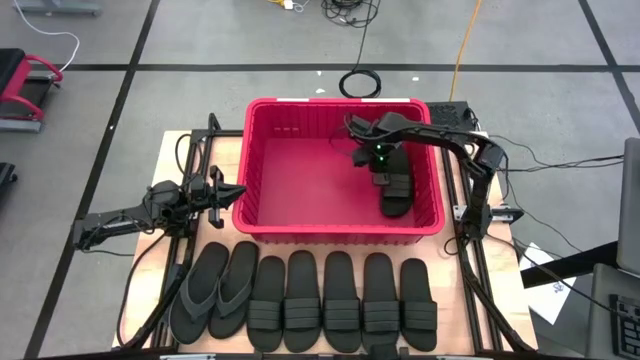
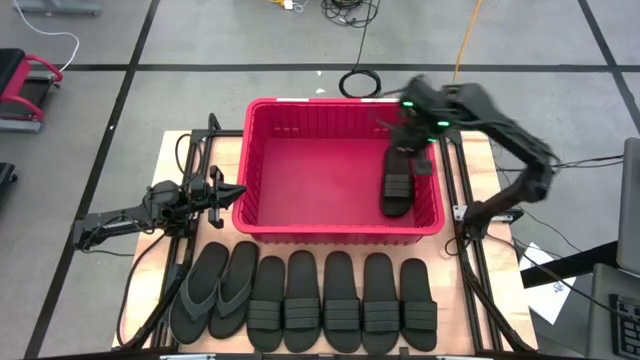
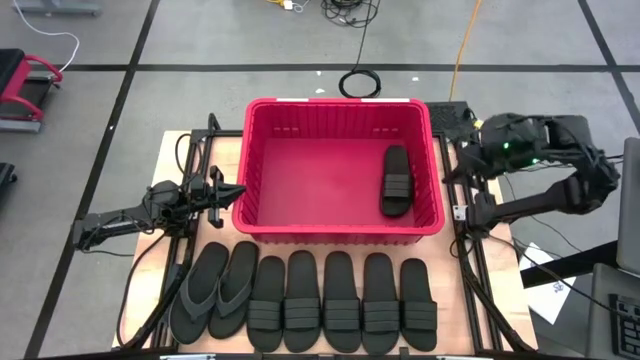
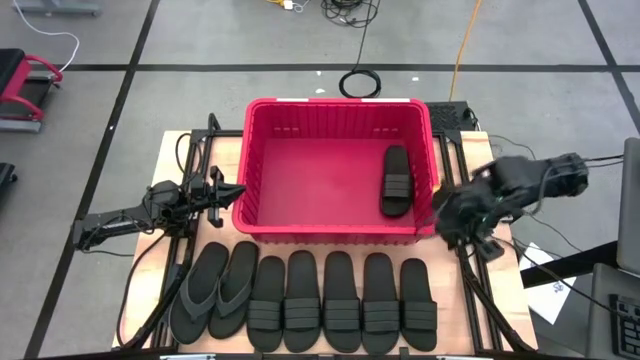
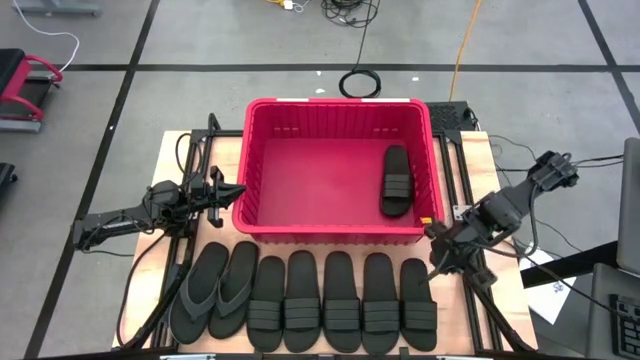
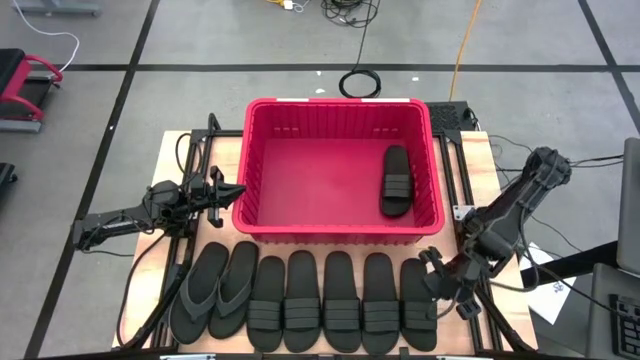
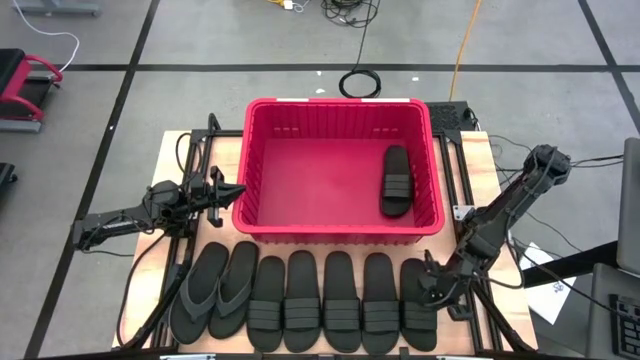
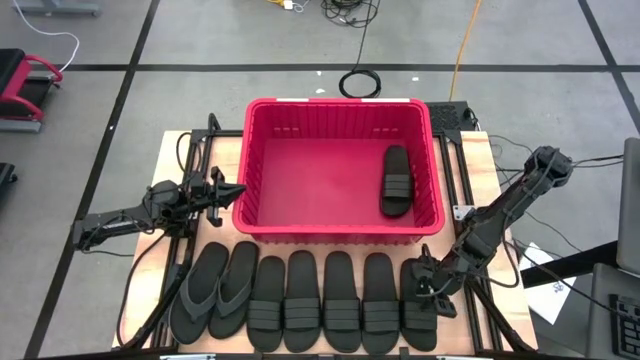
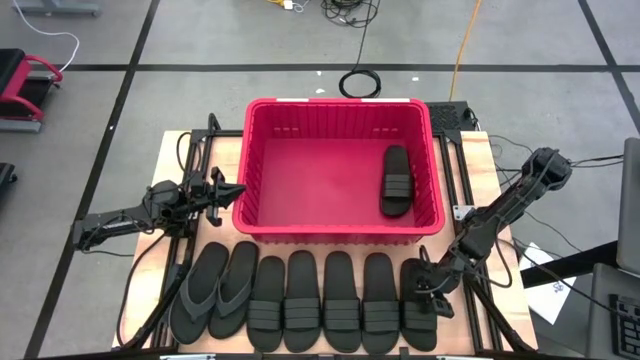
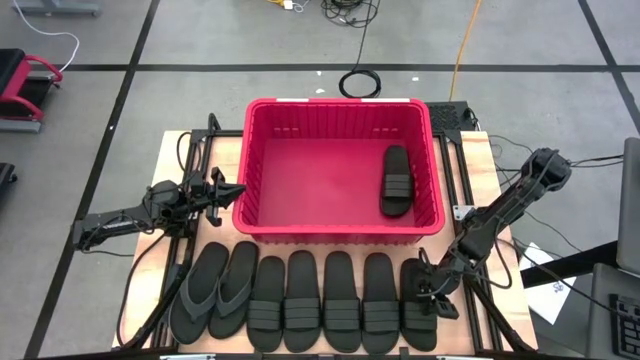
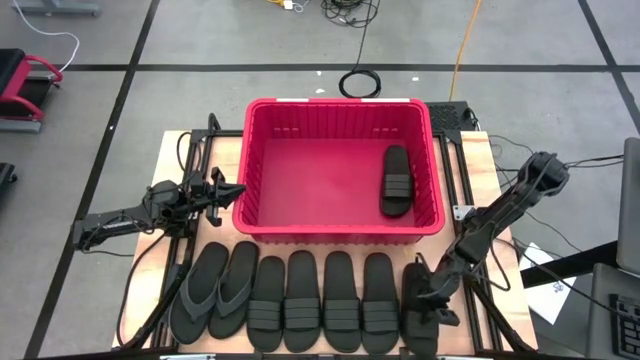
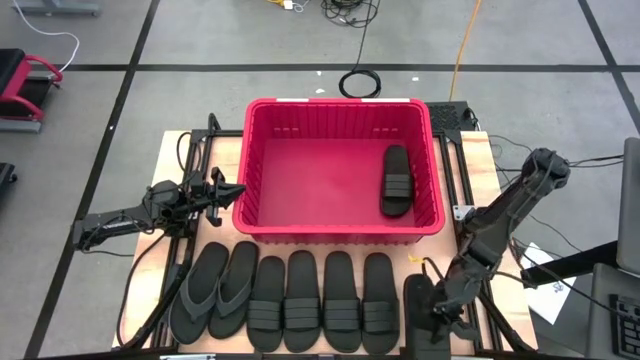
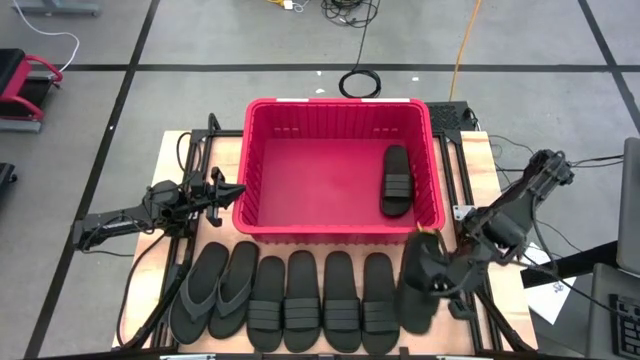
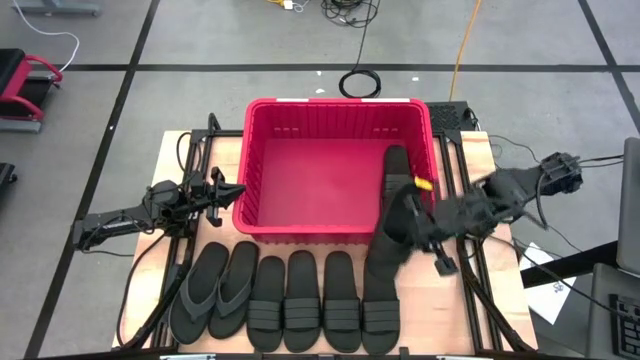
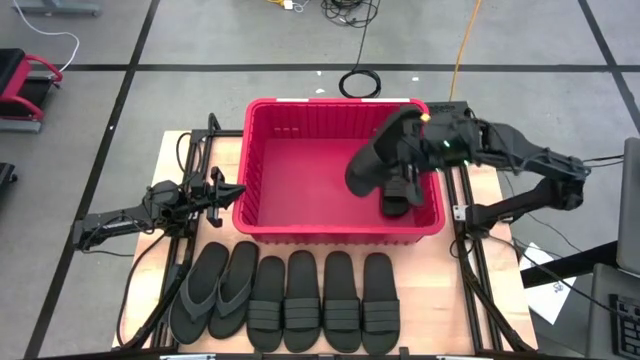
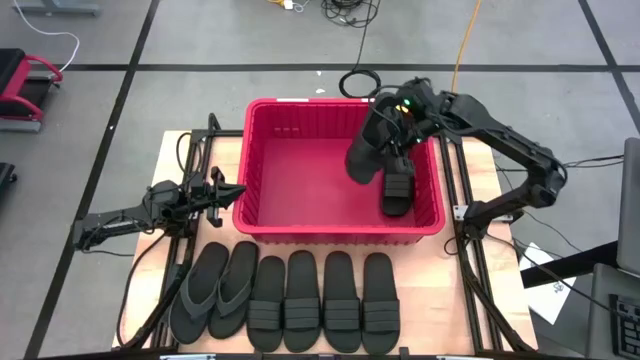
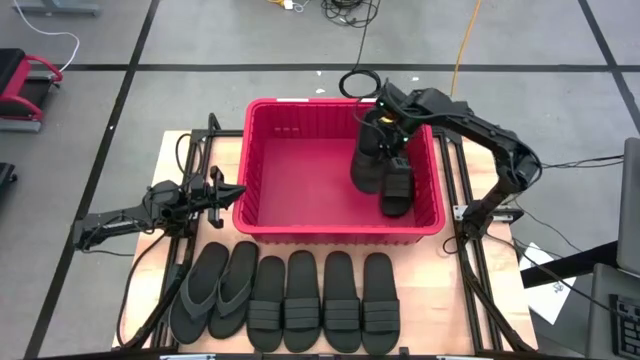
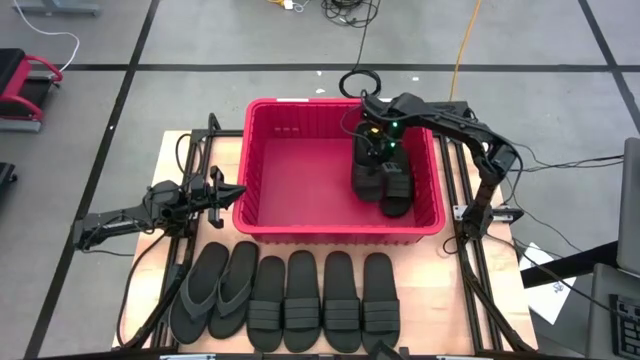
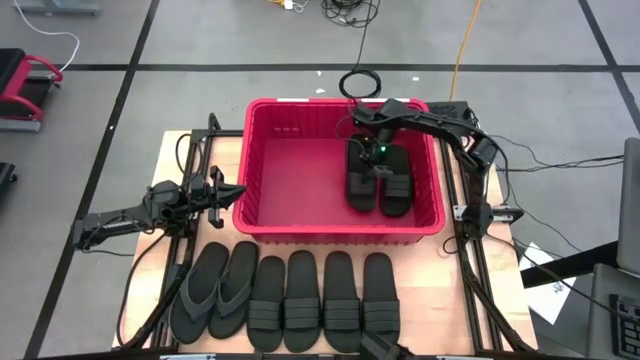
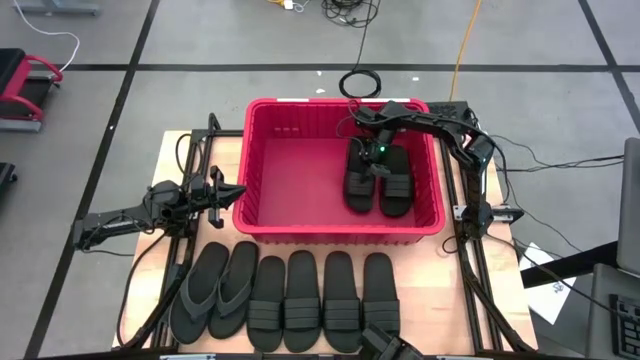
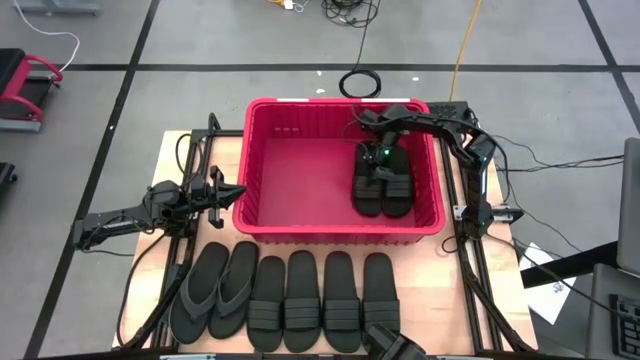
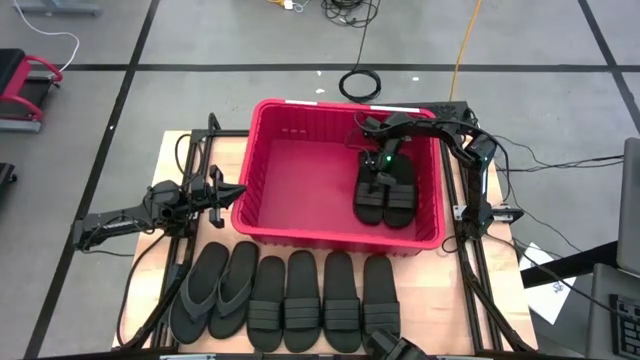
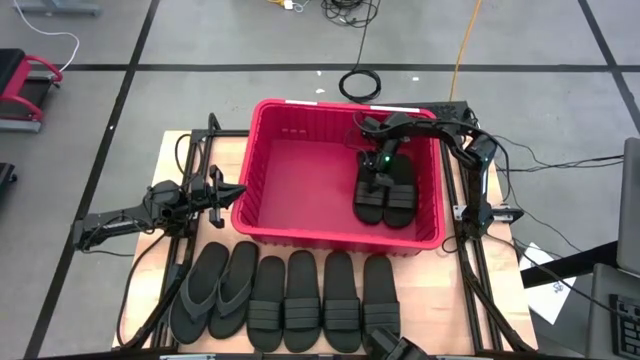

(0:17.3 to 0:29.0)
Task: Pick and place slides into bin
Put the black slide into the red bin

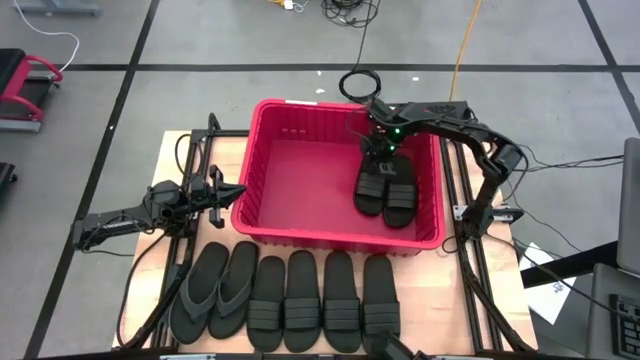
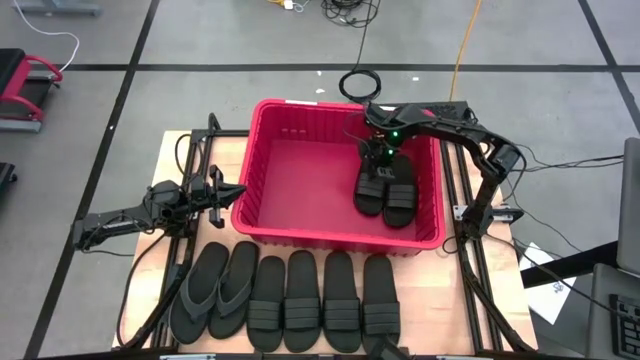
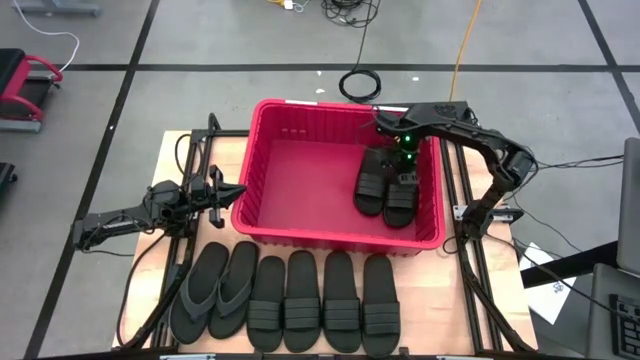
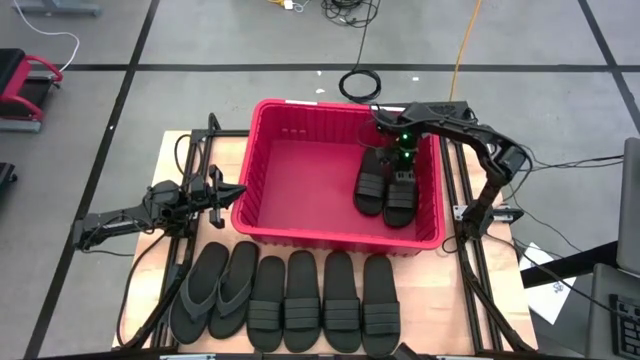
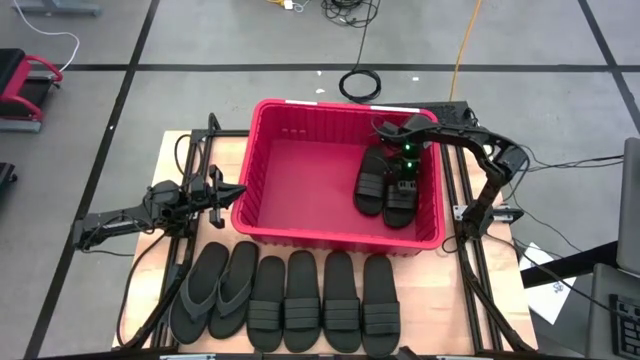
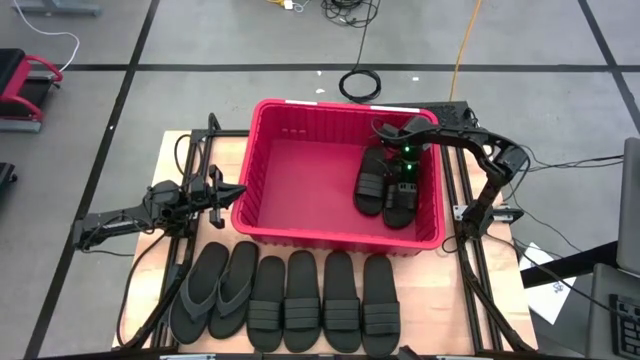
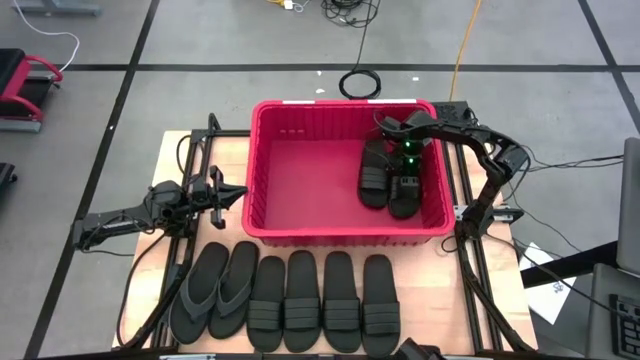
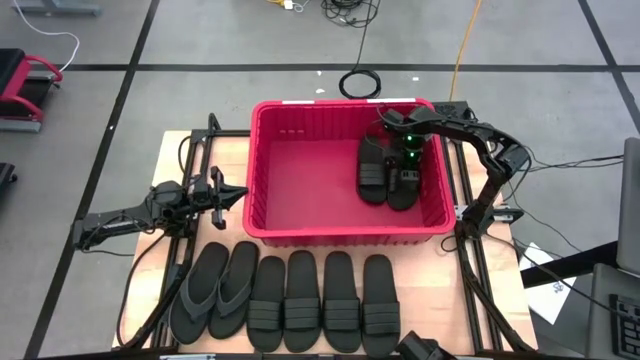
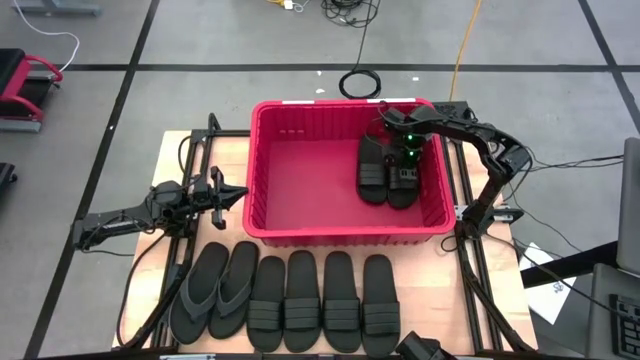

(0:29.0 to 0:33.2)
Adjust the black slide in the red bin

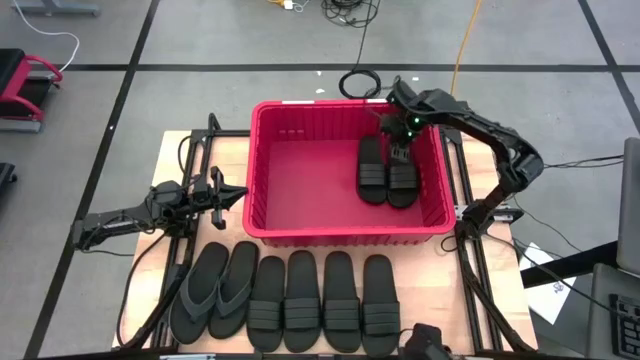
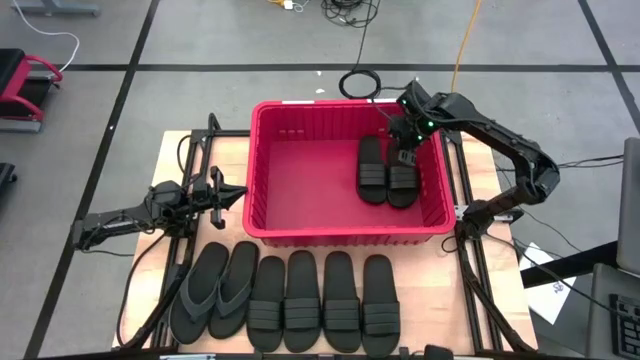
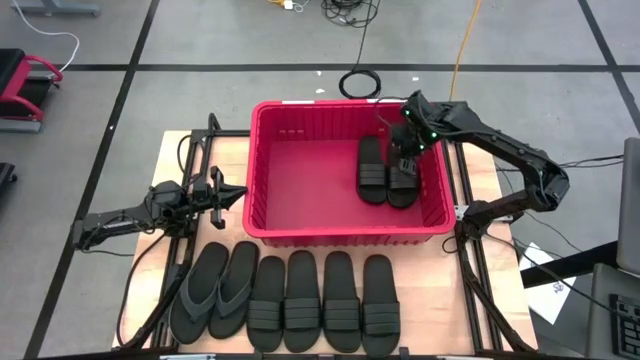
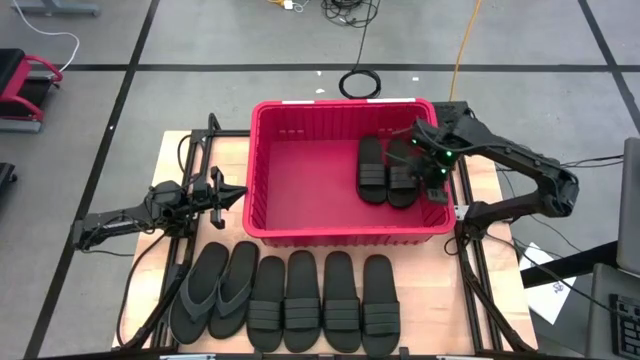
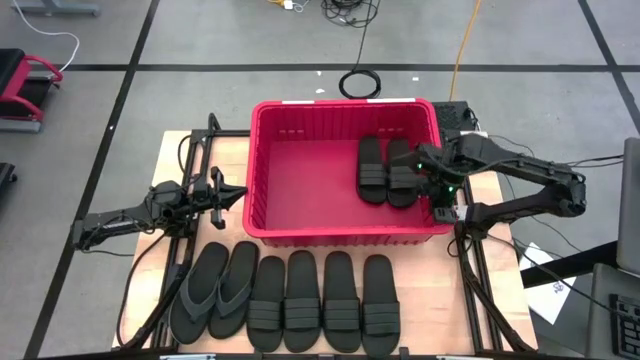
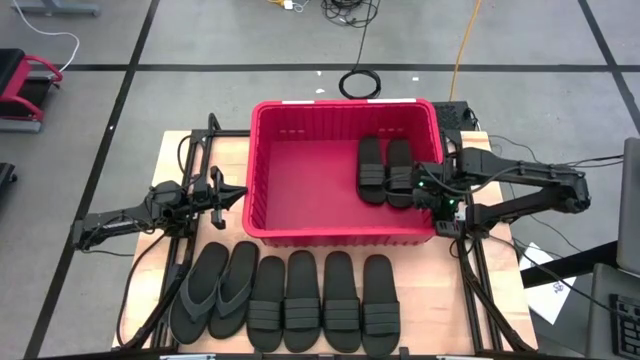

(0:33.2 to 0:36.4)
Adjust the red bin on the table

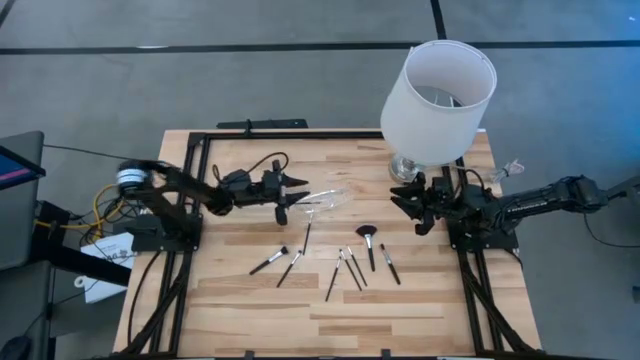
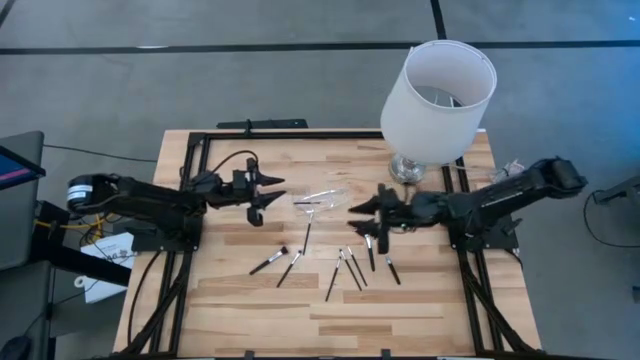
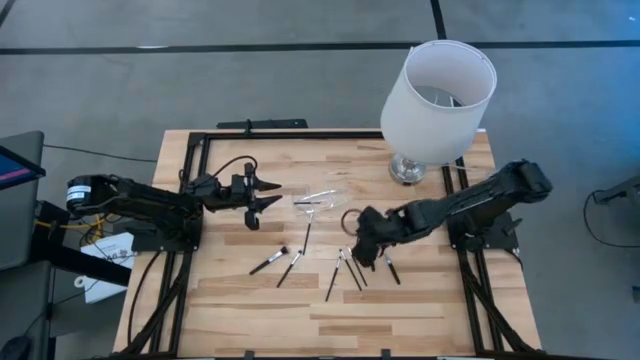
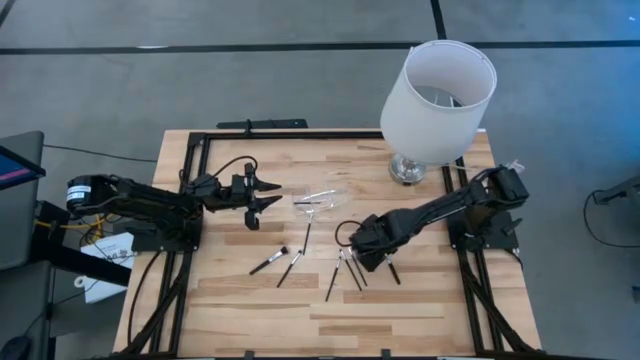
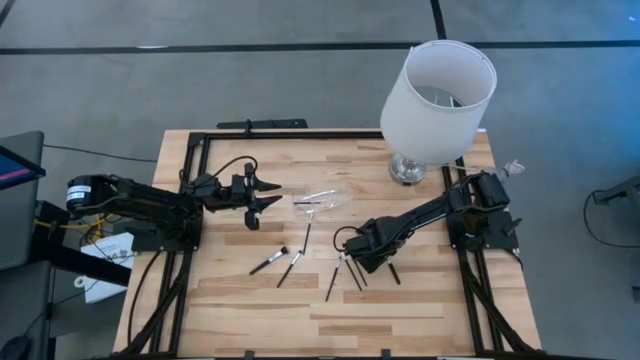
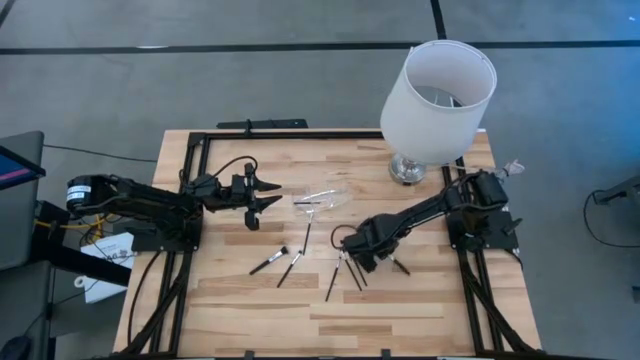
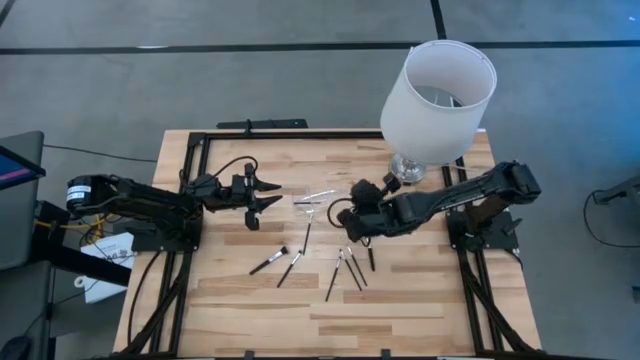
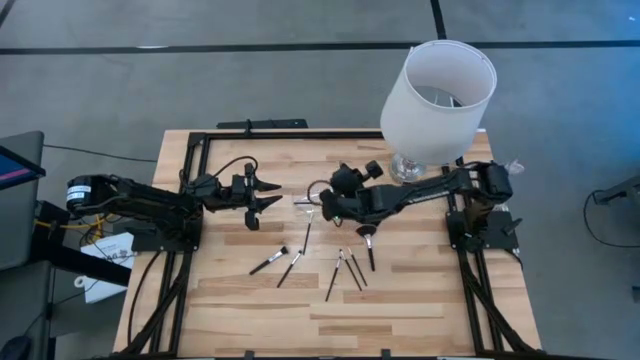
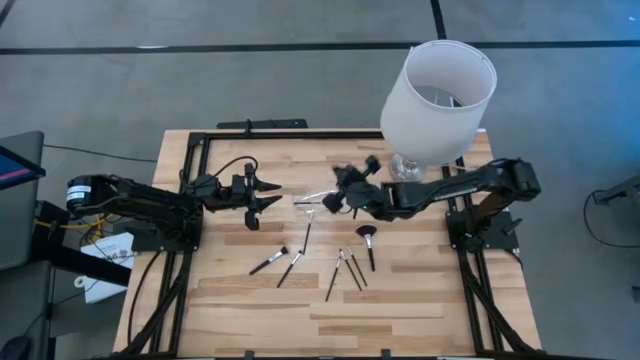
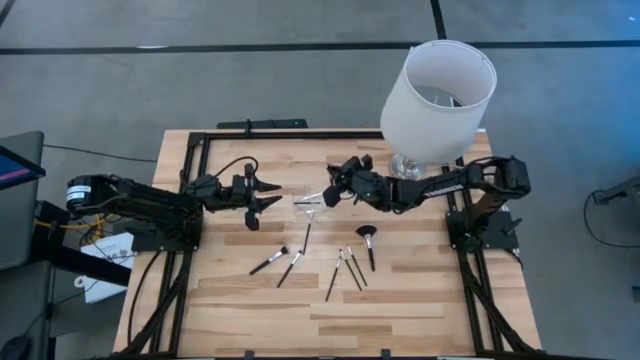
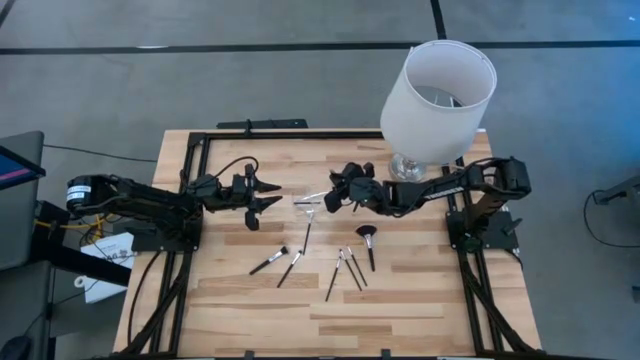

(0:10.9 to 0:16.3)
Task: Pick & Place Makeup Supplies
Put the black makeup brush into the transparent organizer
